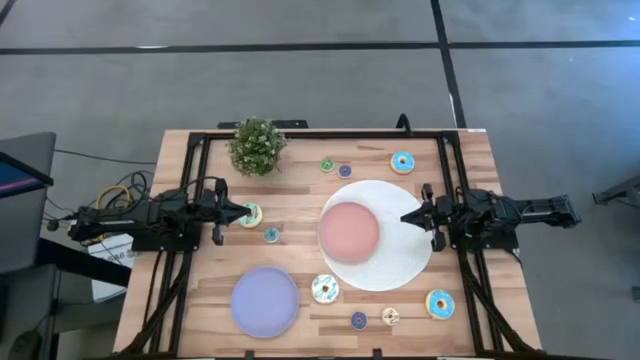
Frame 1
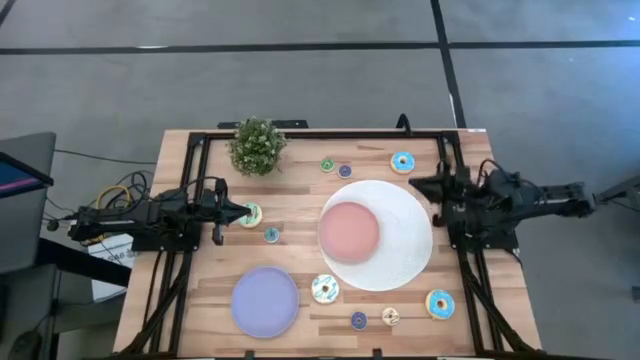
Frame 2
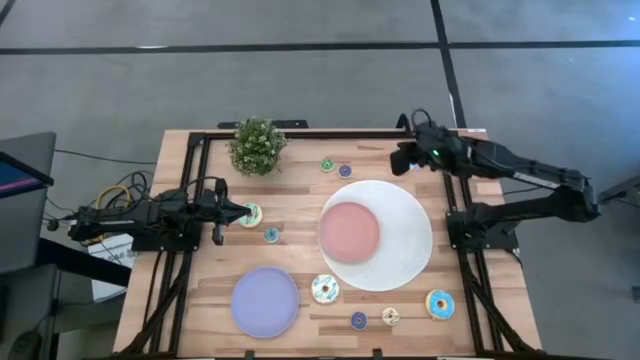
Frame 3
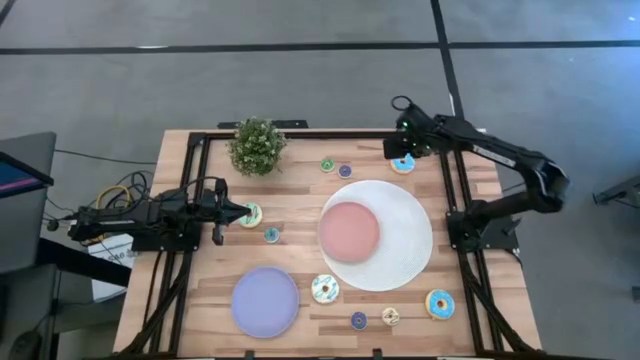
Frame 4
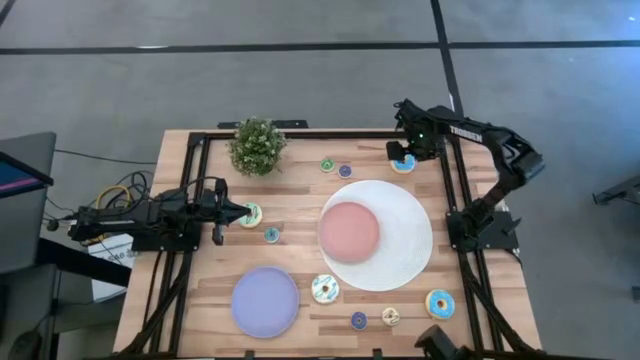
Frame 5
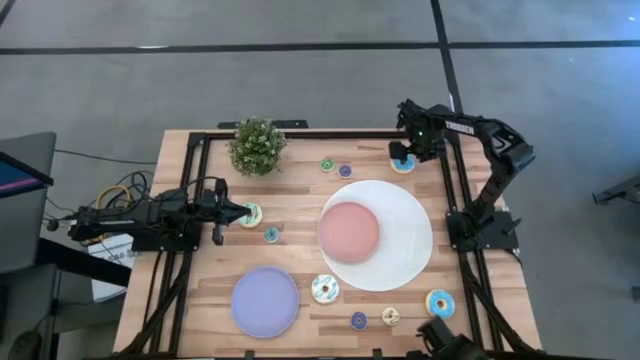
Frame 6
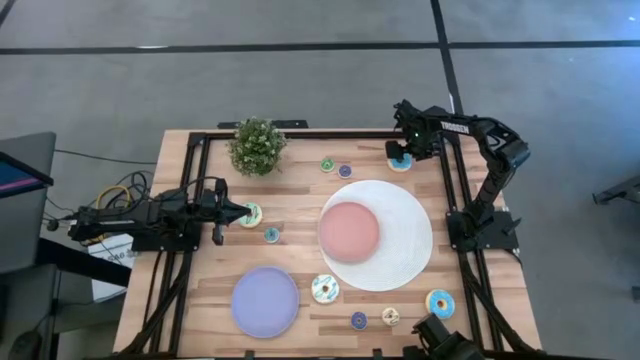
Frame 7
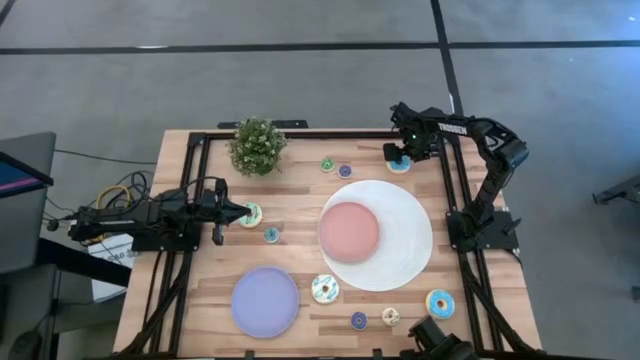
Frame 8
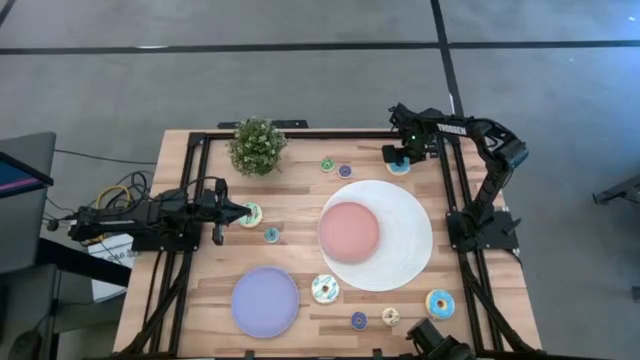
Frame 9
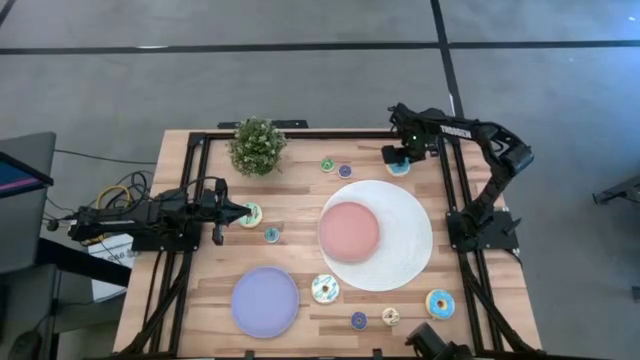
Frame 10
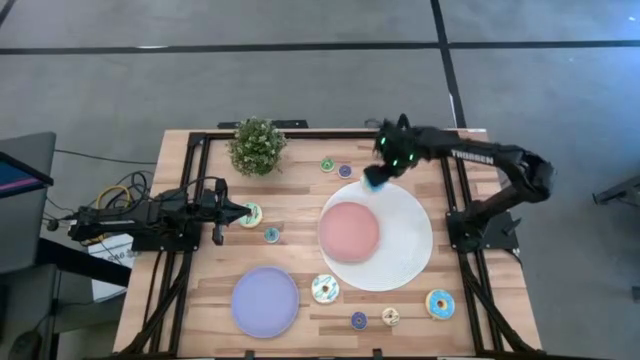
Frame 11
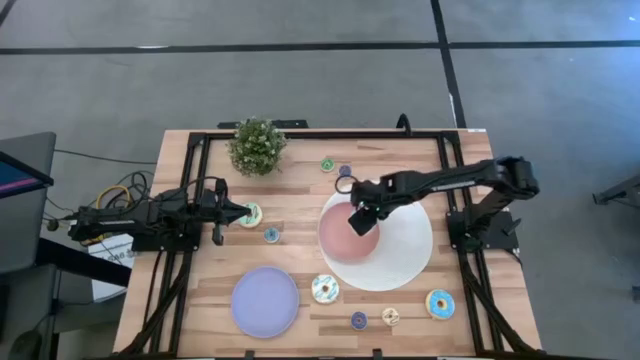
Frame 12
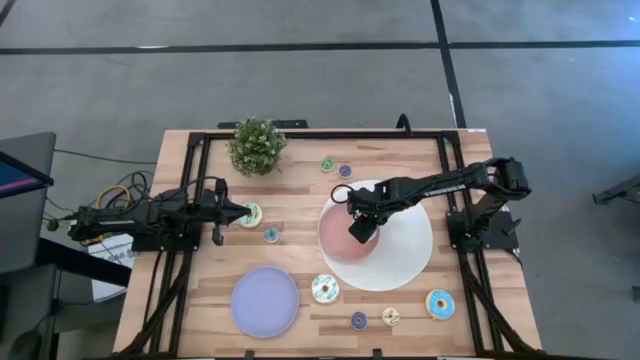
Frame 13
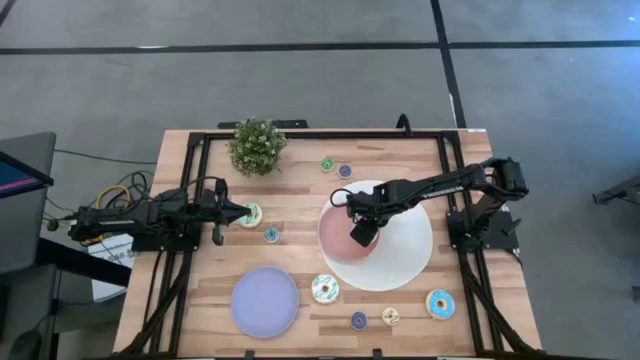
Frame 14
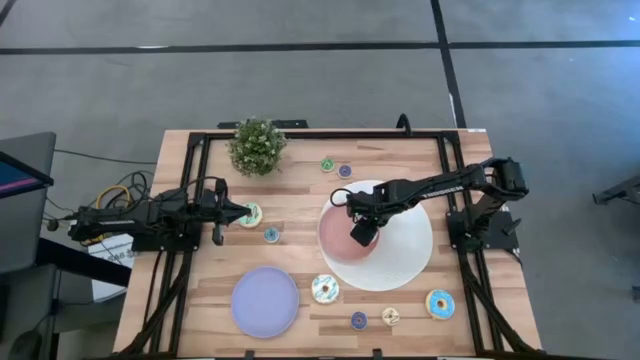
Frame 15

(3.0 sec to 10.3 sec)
Task: Pick & Place donuts
Put the large blue donut on the light pink plate

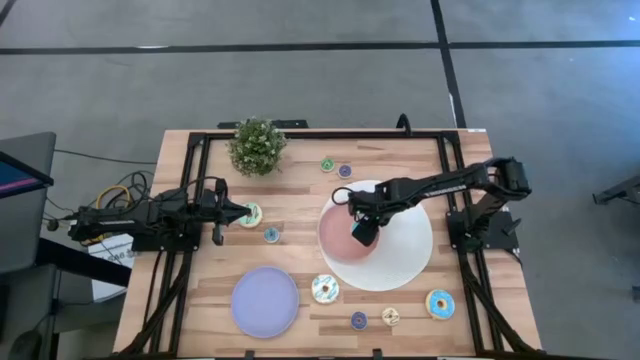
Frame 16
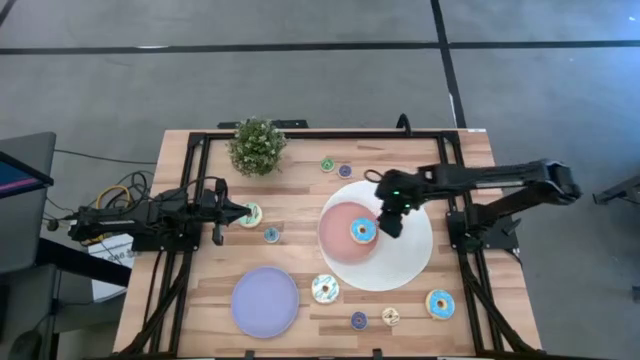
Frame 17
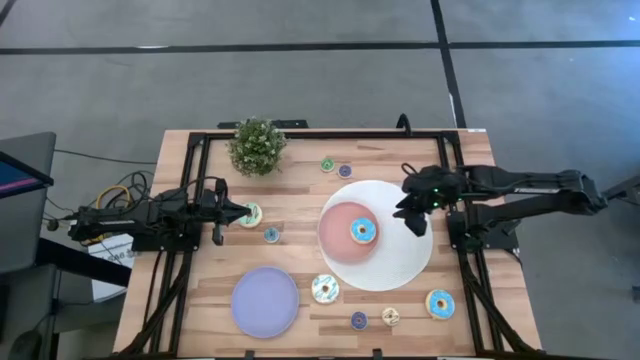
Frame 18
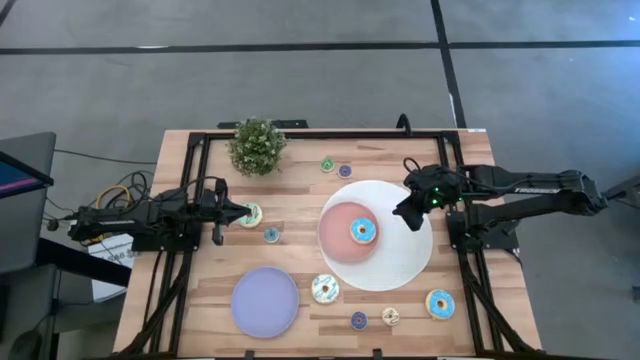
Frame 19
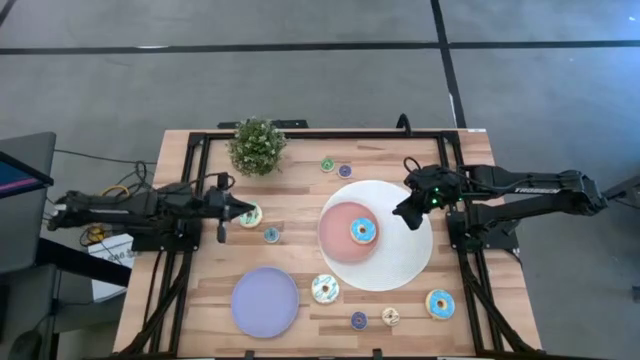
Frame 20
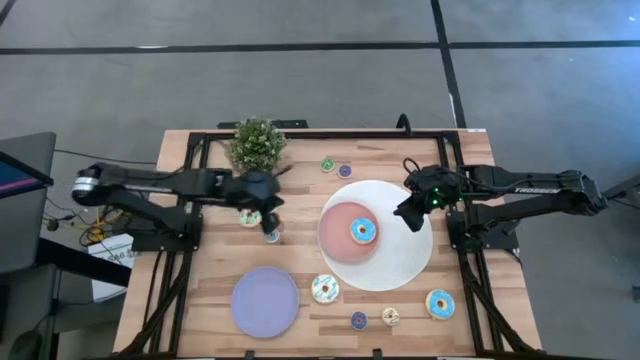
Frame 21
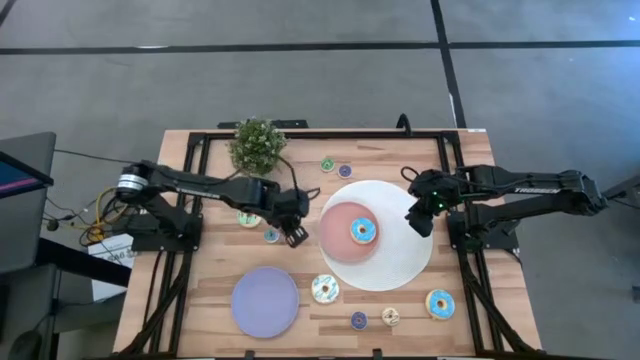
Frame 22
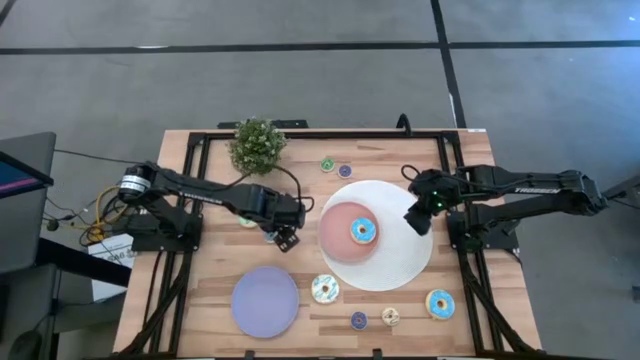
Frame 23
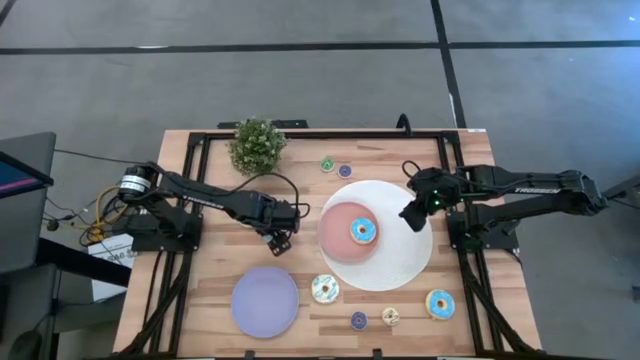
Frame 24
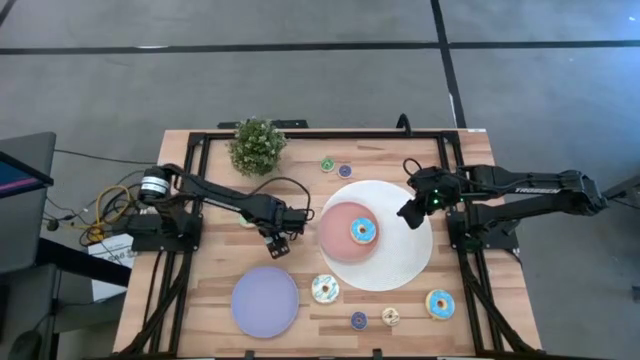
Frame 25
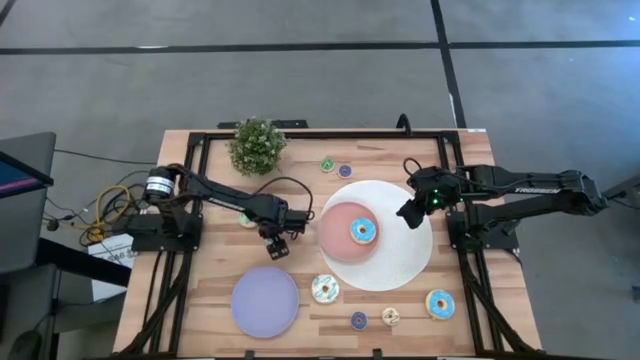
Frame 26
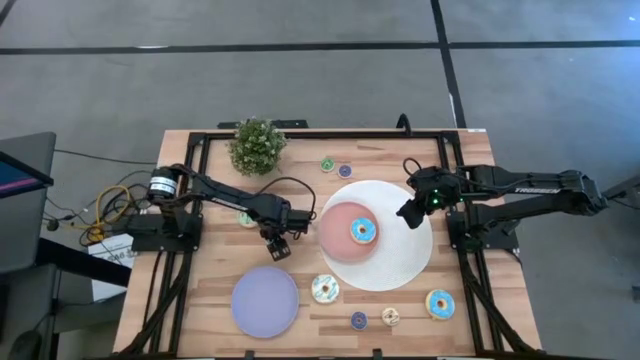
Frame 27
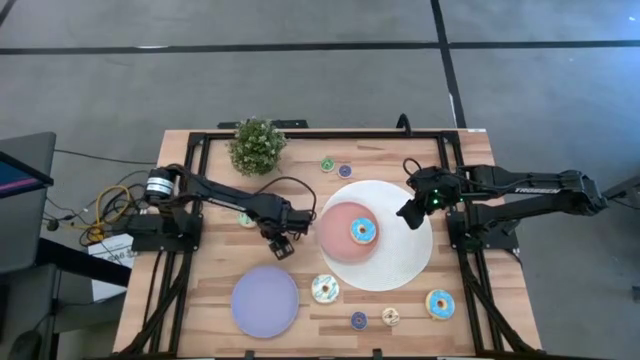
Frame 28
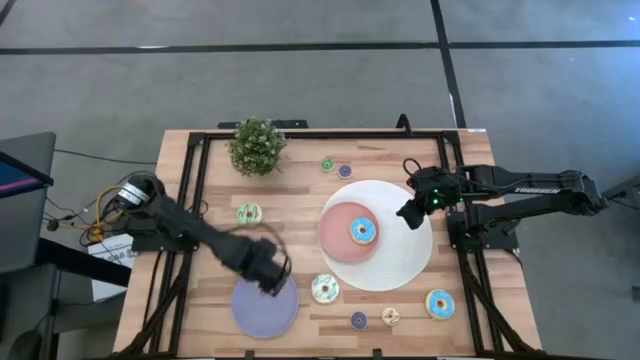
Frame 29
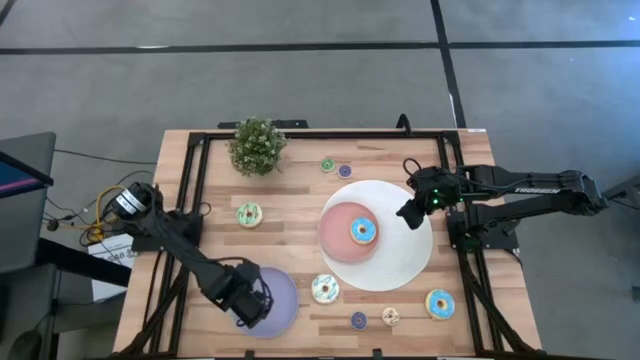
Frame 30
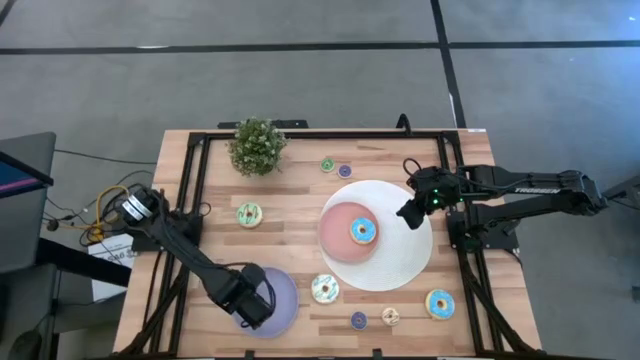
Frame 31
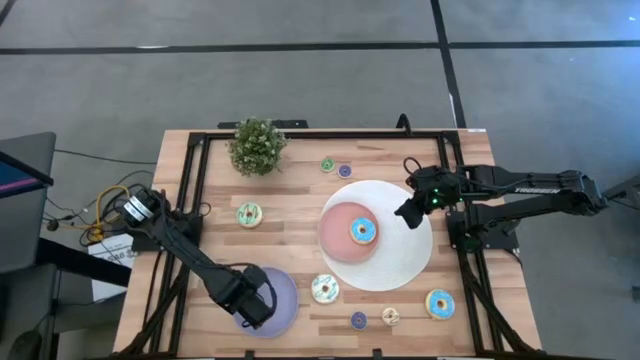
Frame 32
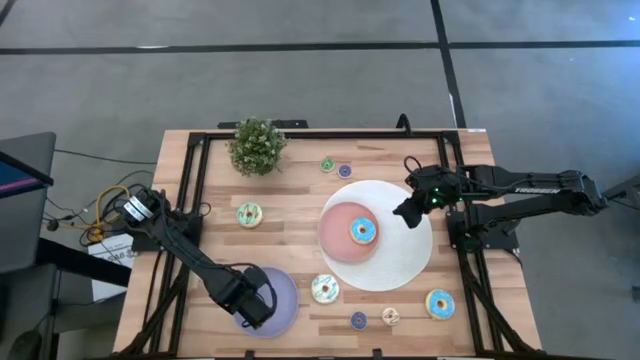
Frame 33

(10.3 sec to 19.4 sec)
Put the small light blue donut on the purple plate

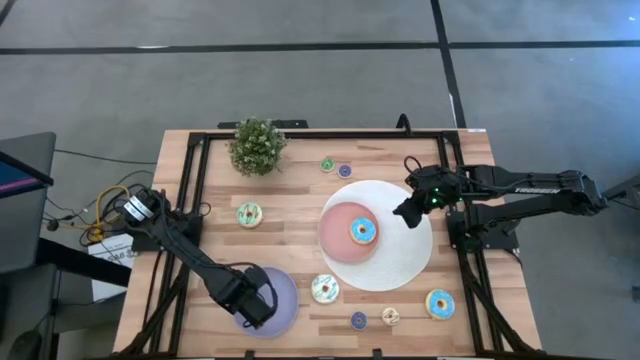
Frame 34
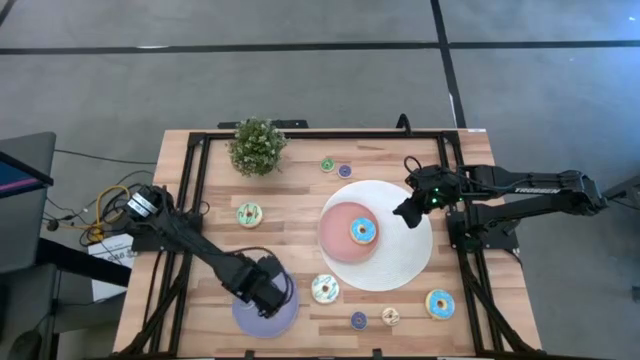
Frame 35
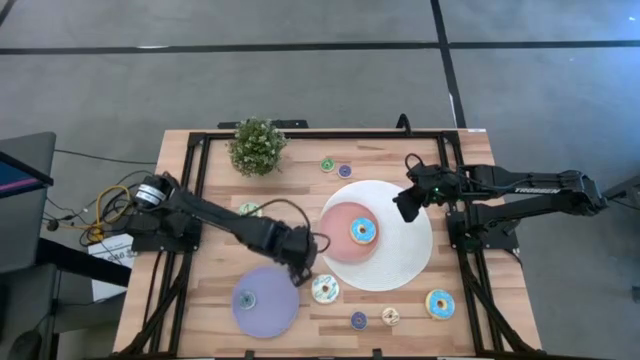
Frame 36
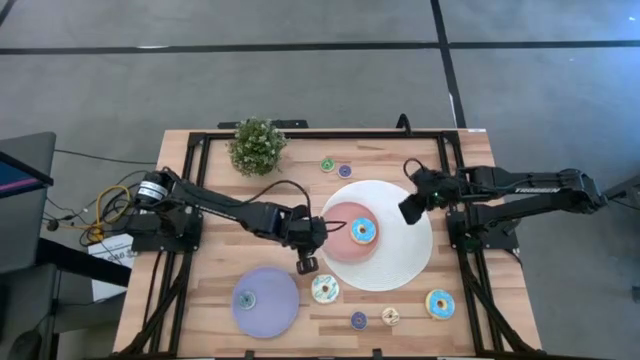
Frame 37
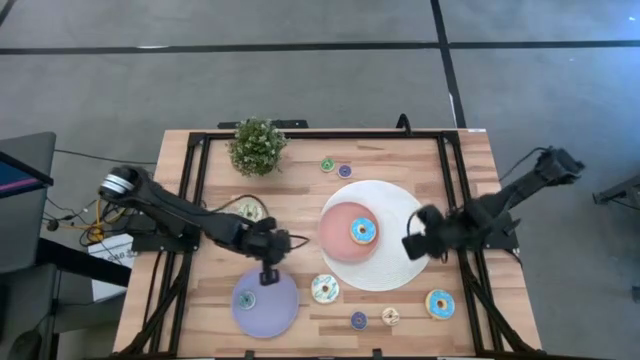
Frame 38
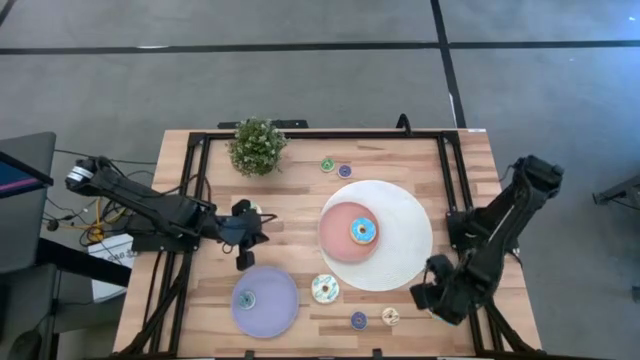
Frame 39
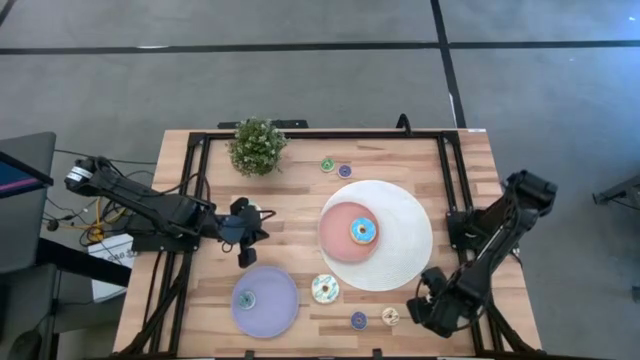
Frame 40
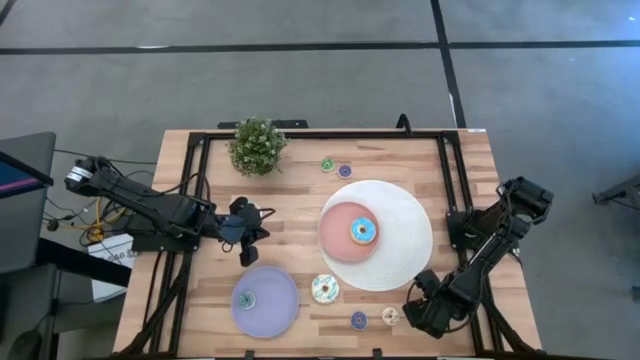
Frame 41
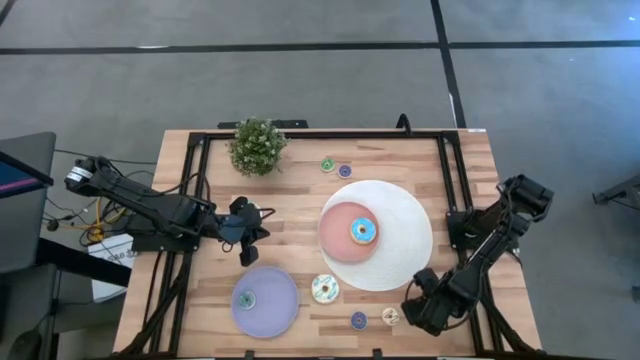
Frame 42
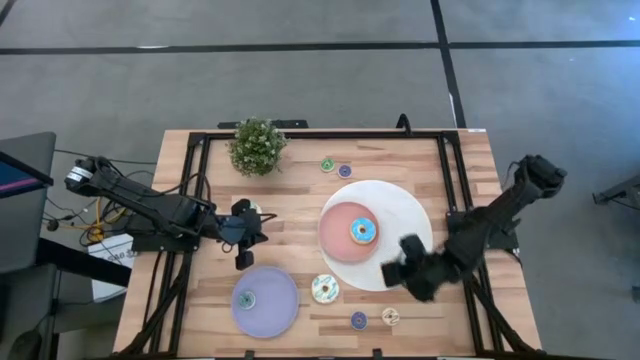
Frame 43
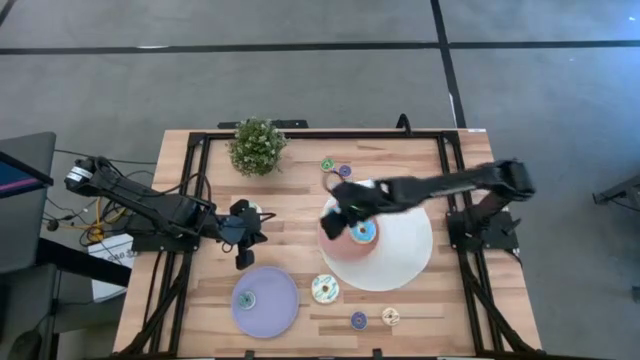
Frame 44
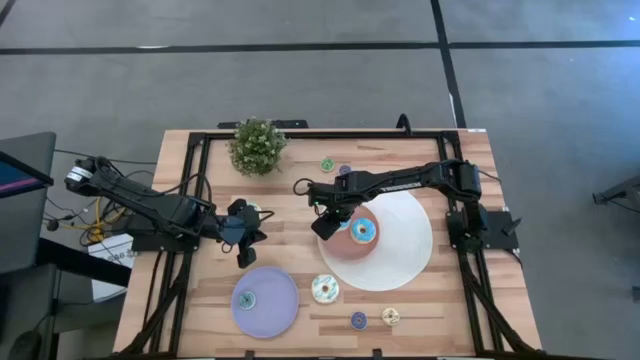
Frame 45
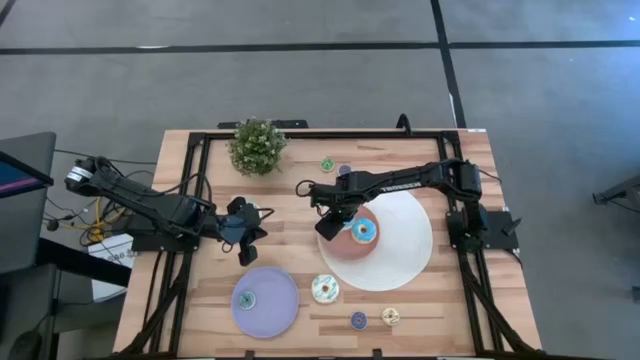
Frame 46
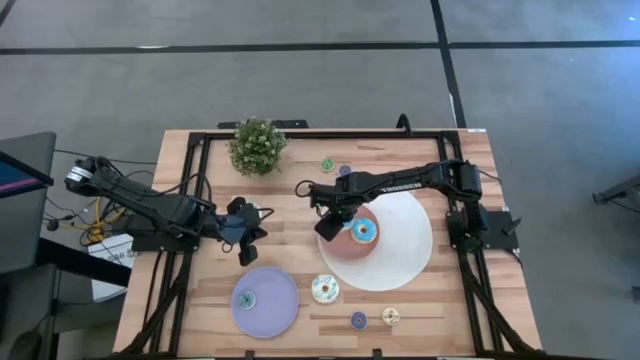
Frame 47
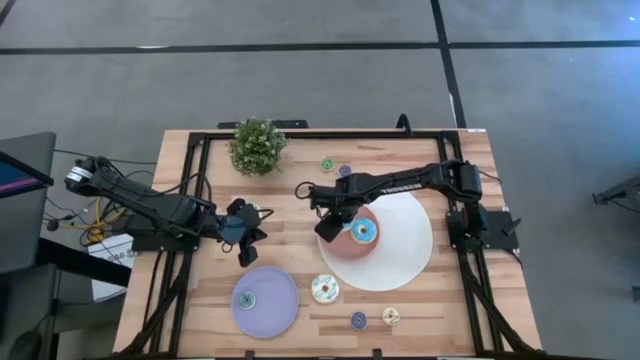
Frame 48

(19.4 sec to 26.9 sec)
Put the large blue donut on the light pink plate
